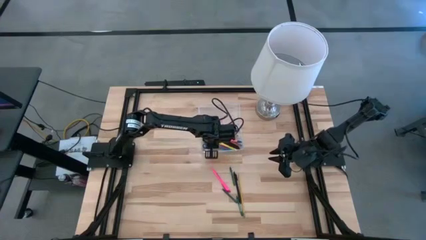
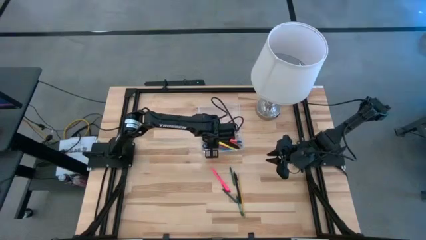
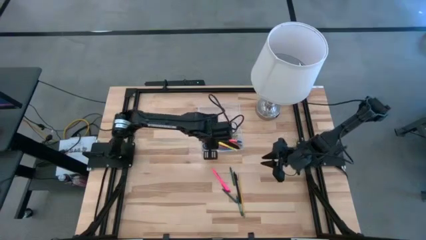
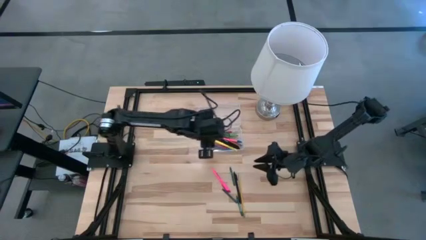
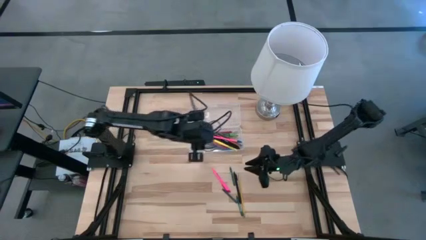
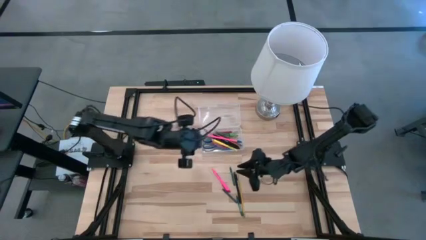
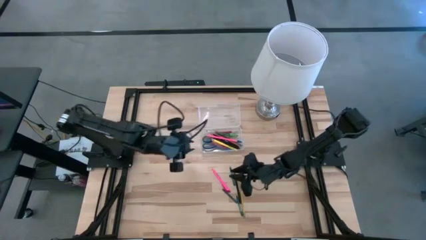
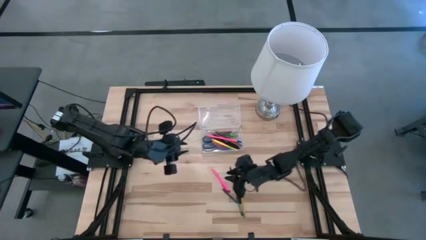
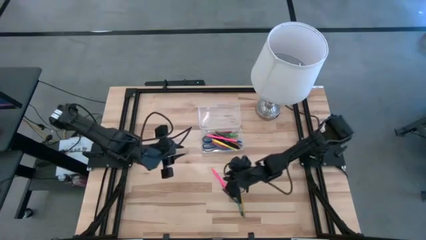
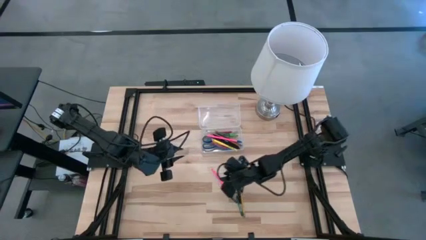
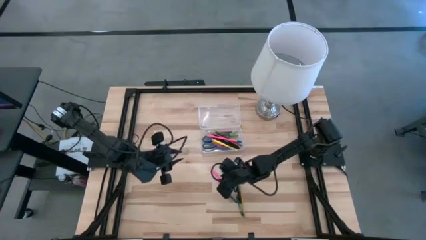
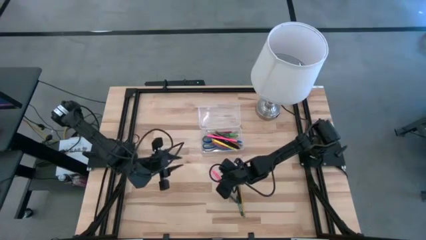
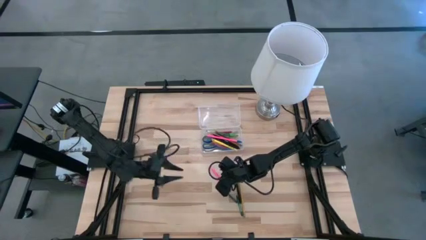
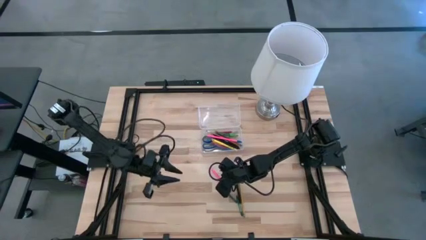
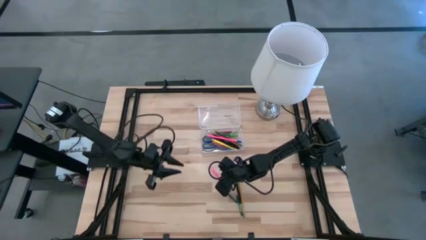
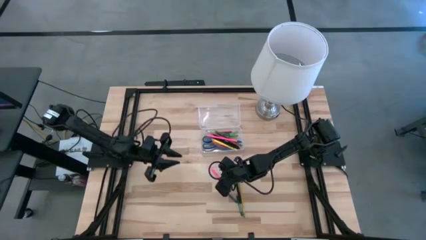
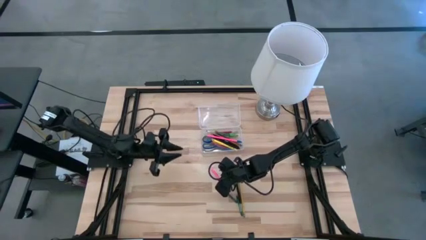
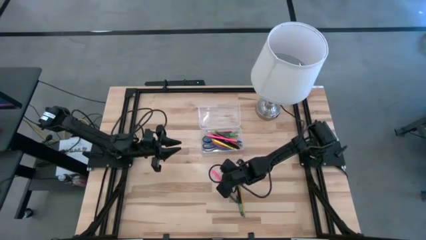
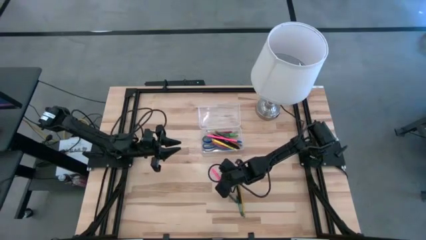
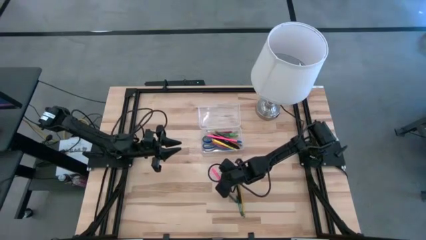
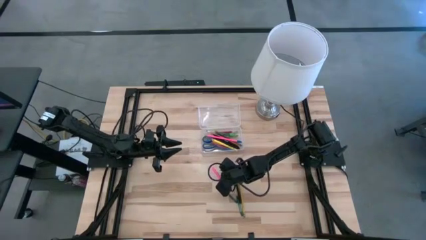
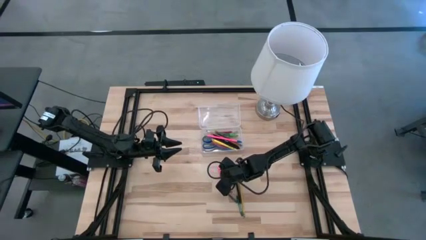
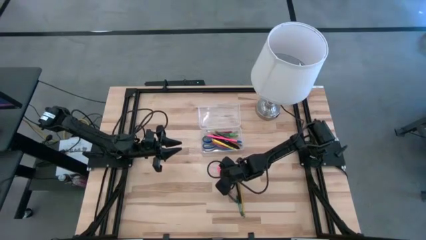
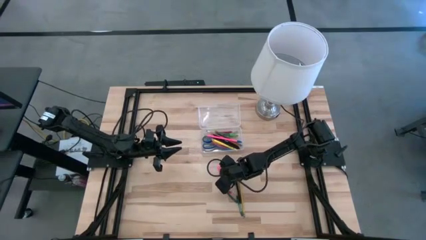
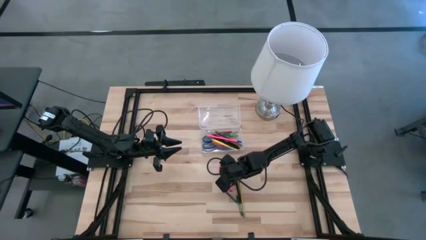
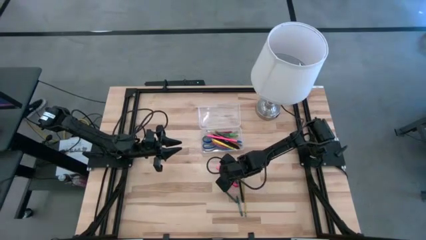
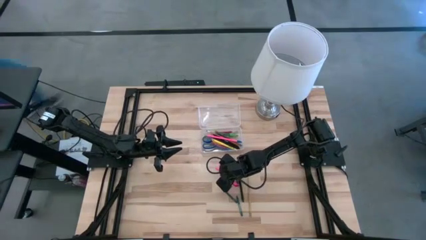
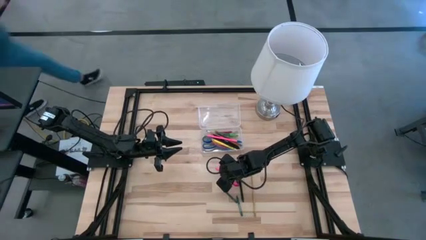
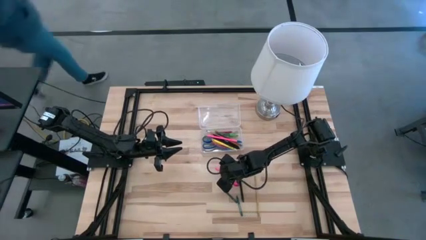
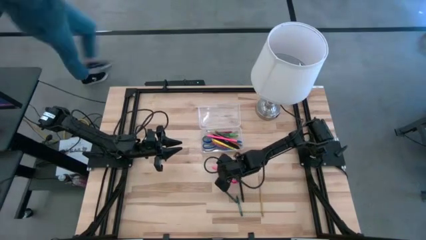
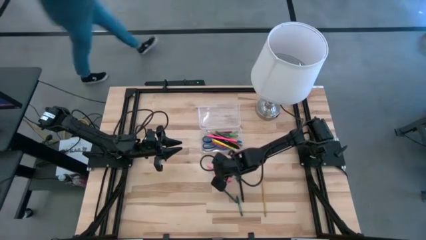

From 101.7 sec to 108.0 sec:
Task: Pick & place school supplies into a supply box
Put the pink pen into the transparent supply box

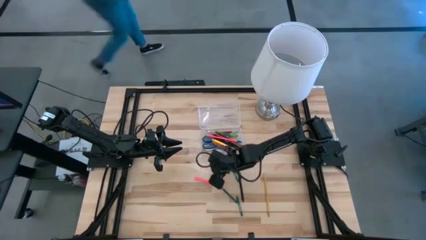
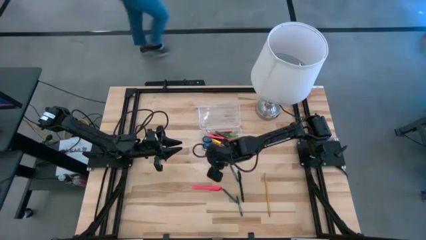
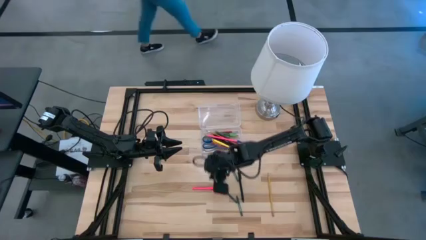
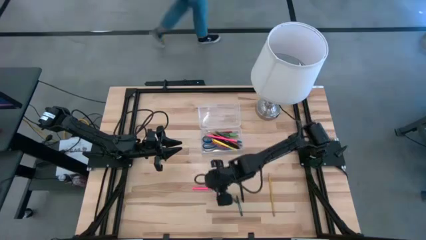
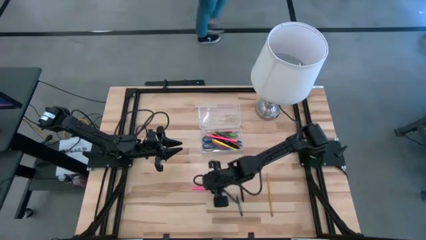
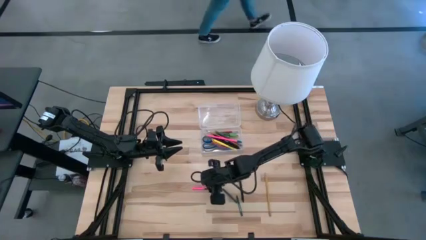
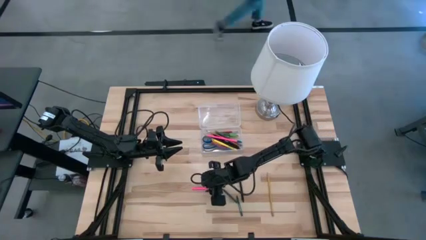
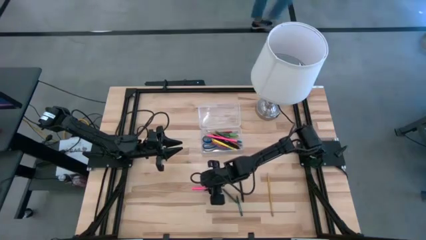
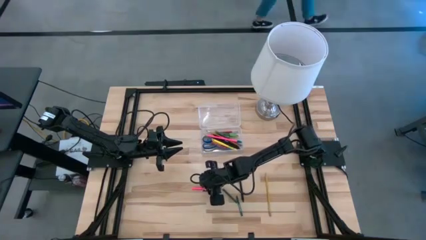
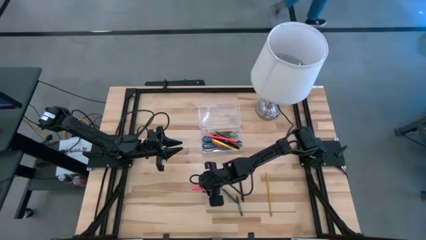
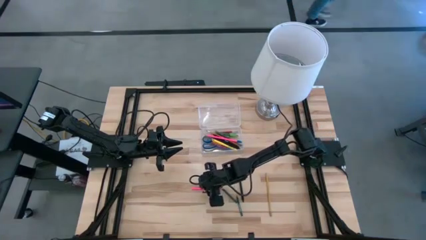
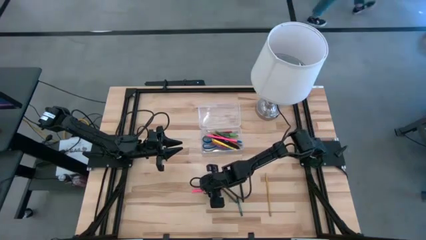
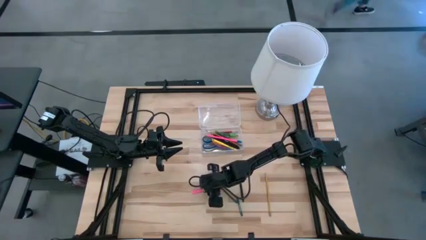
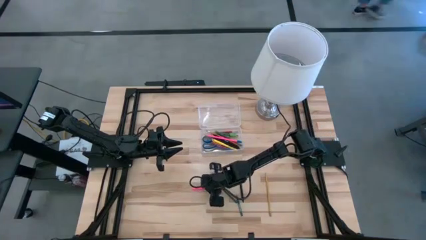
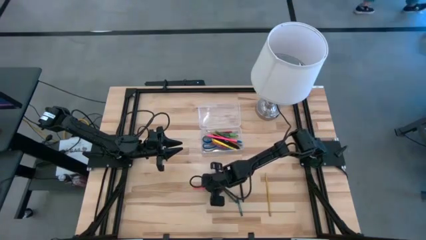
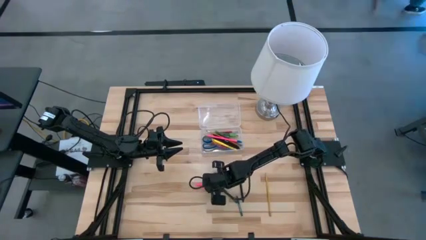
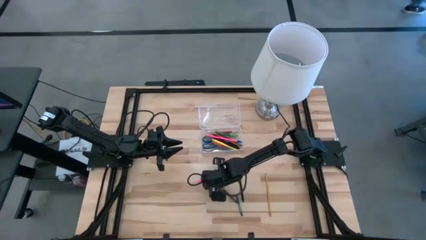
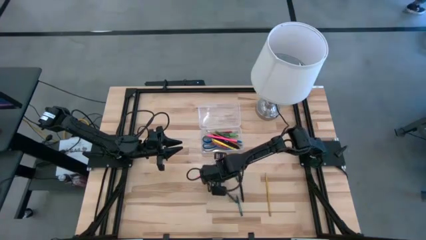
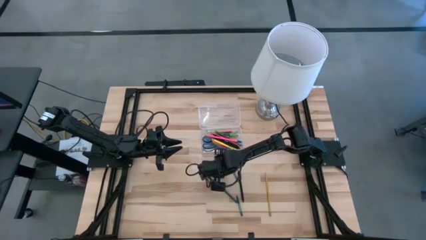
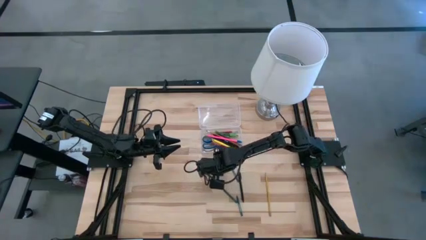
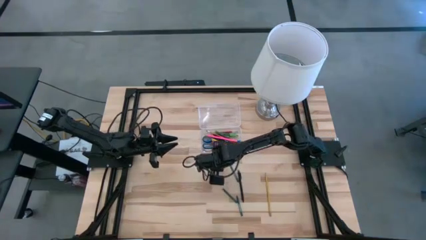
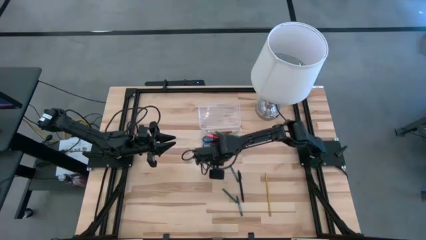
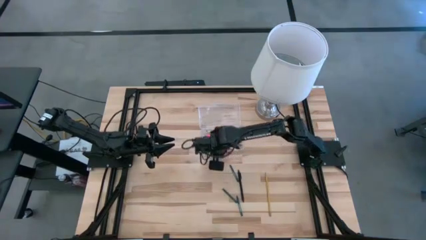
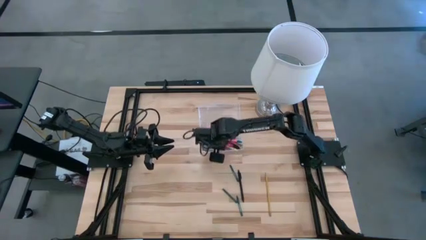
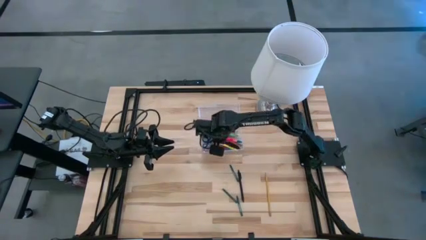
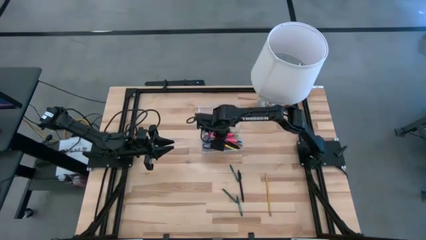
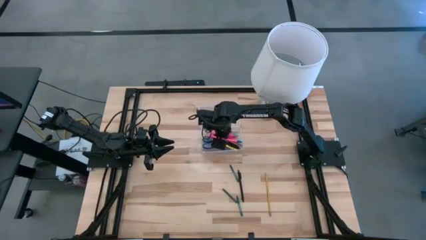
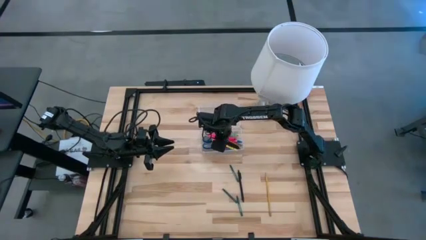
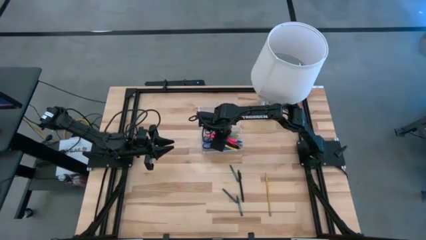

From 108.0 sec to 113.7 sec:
Put the pink pen into the transparent supply box

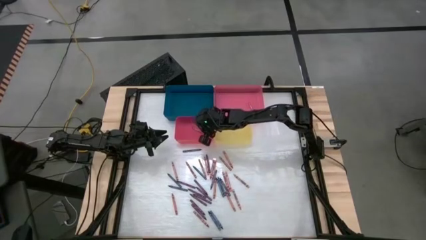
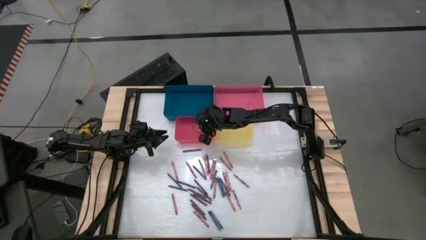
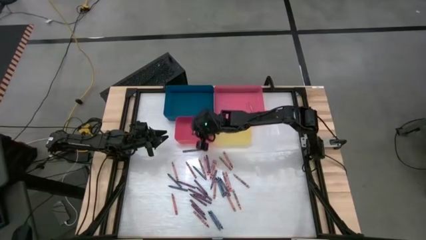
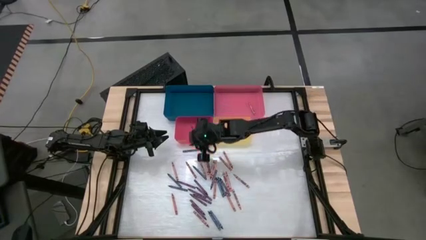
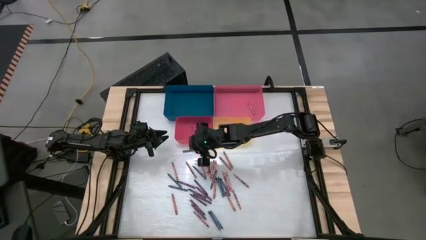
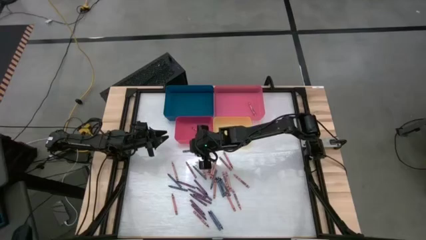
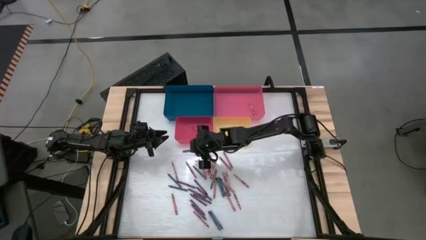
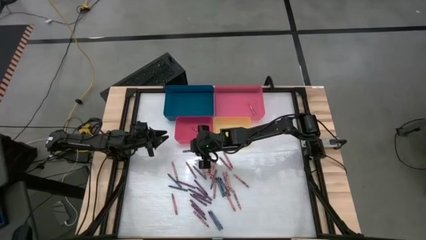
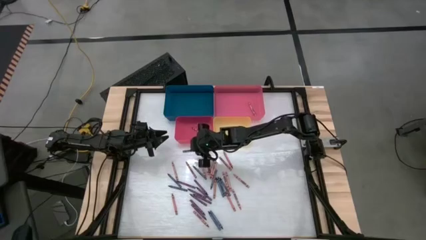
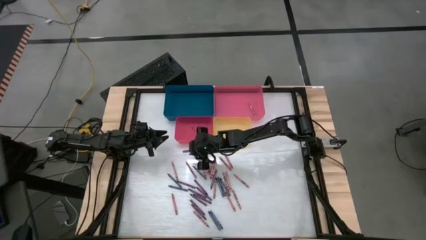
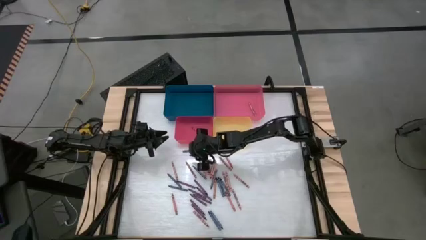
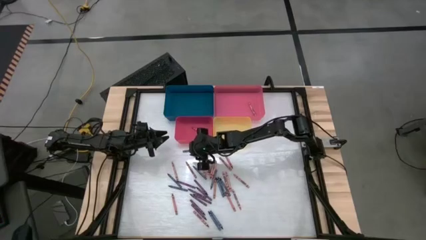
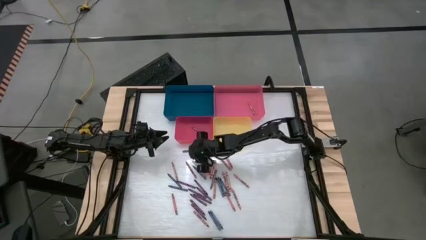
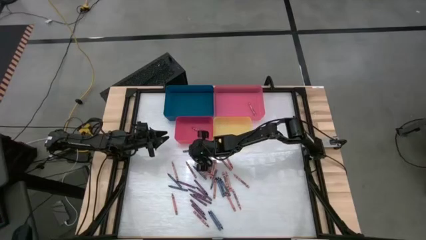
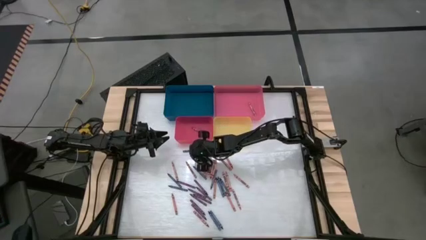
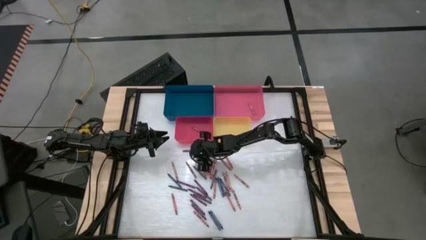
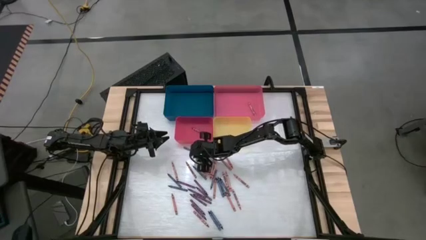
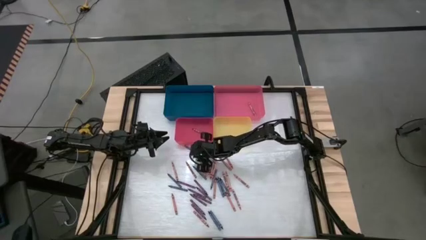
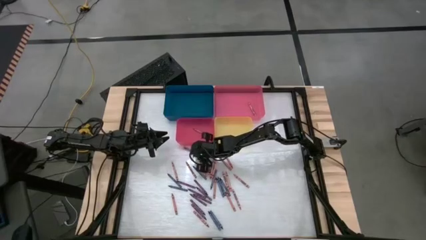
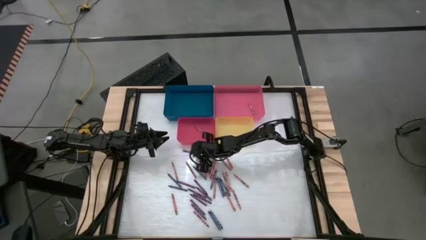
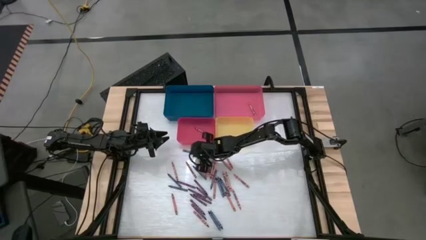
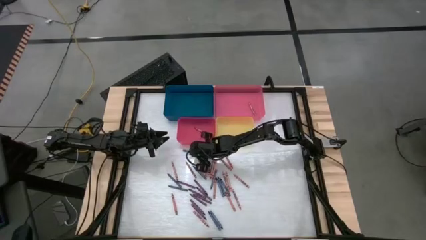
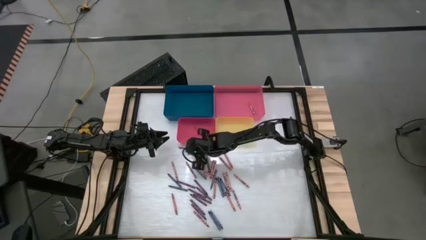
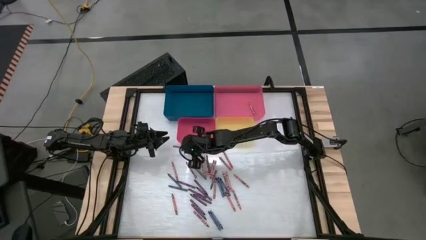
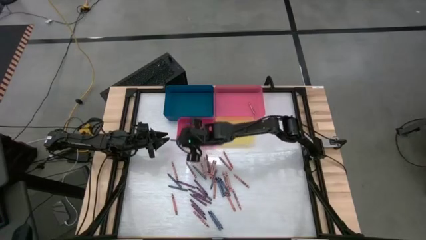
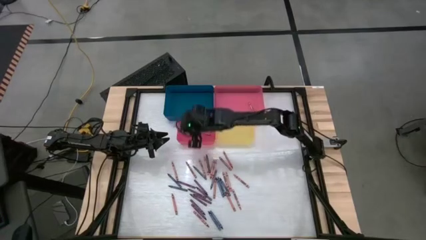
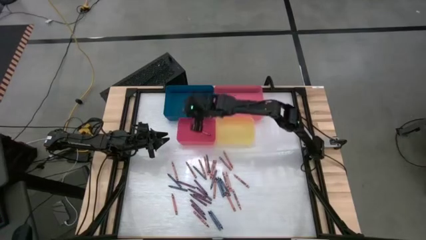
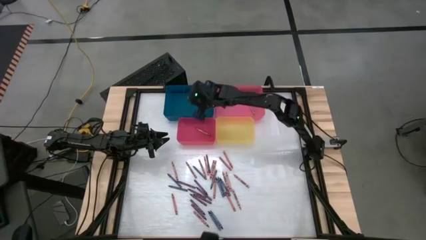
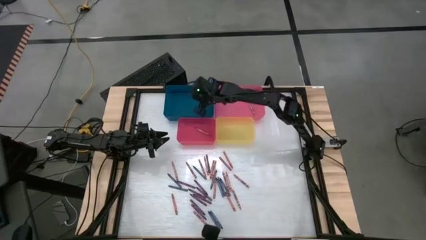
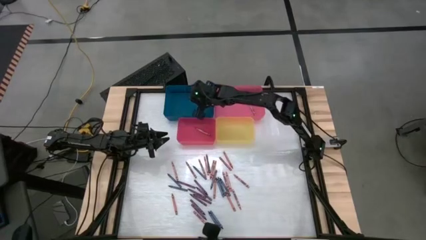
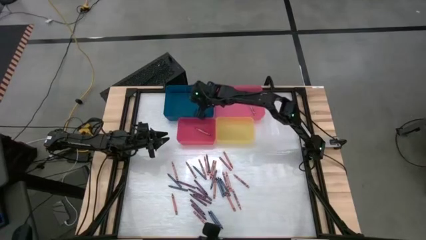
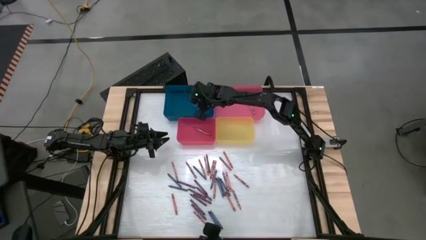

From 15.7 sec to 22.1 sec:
Task: Sort crayons
Put the blue crayon into the blue bin
